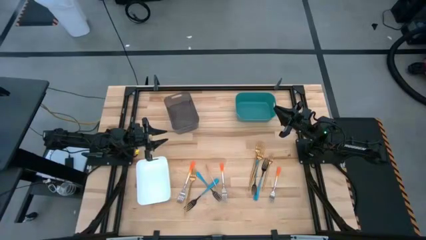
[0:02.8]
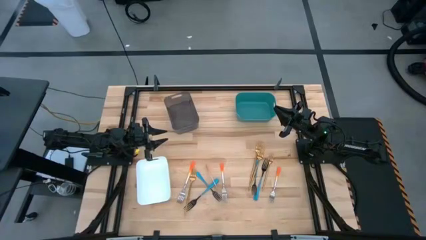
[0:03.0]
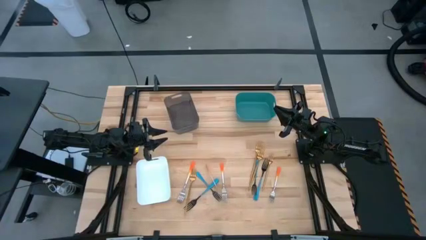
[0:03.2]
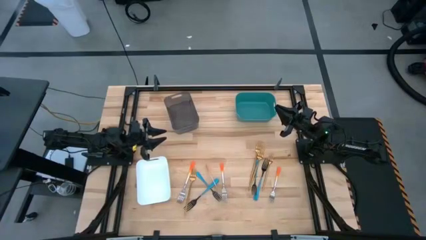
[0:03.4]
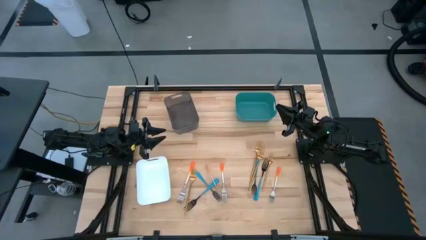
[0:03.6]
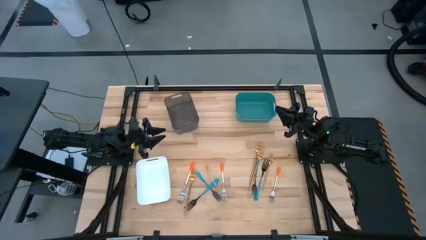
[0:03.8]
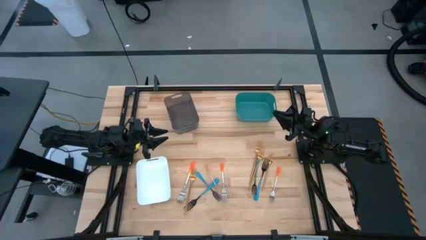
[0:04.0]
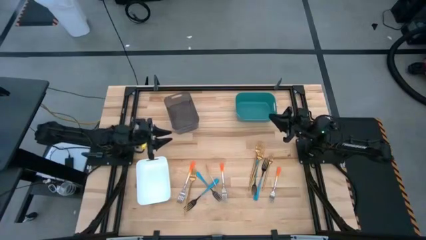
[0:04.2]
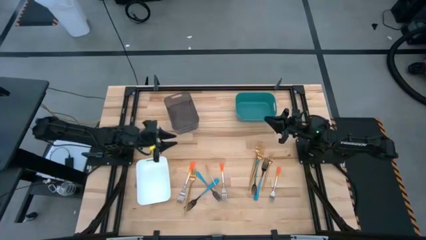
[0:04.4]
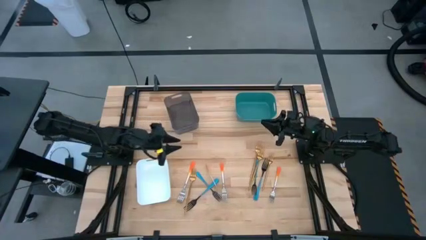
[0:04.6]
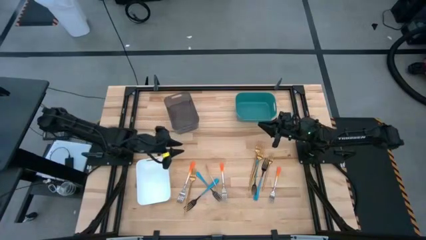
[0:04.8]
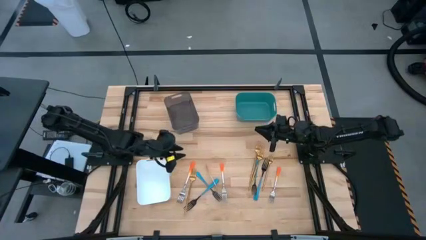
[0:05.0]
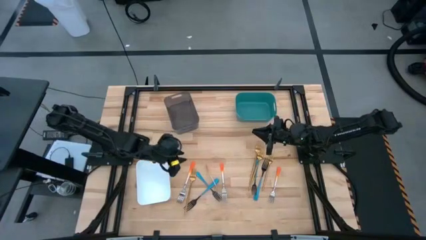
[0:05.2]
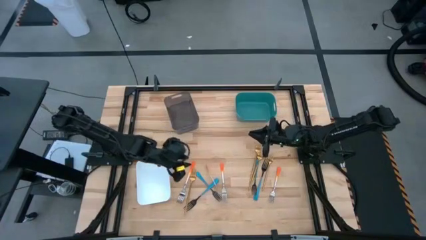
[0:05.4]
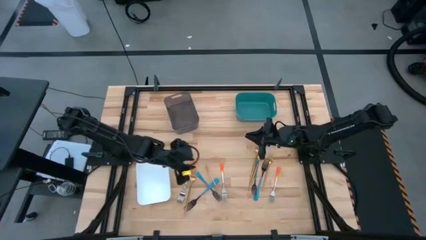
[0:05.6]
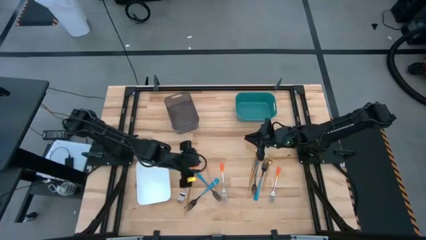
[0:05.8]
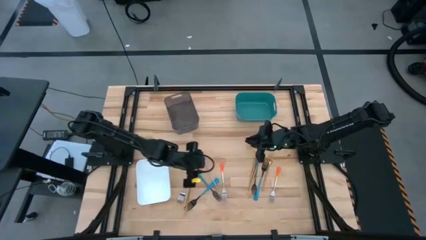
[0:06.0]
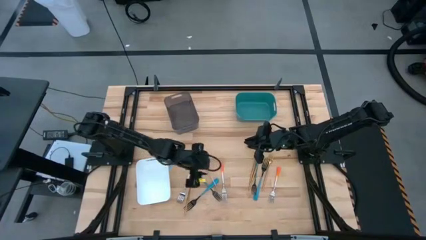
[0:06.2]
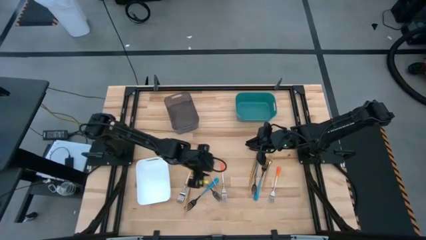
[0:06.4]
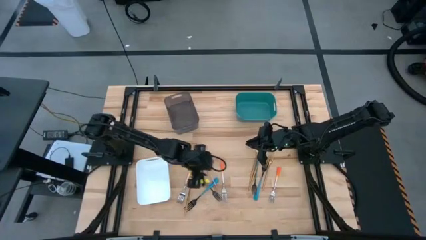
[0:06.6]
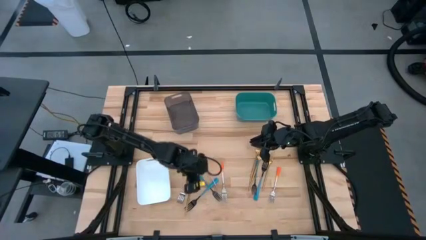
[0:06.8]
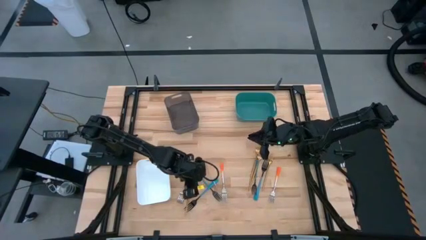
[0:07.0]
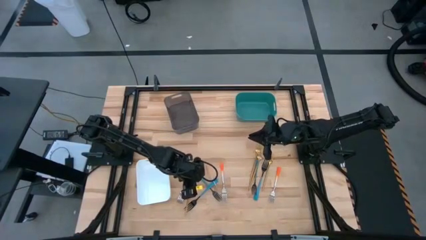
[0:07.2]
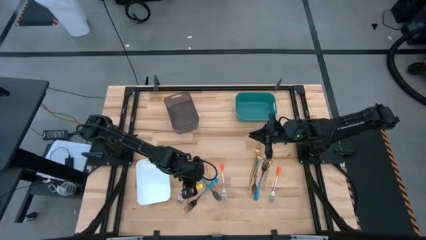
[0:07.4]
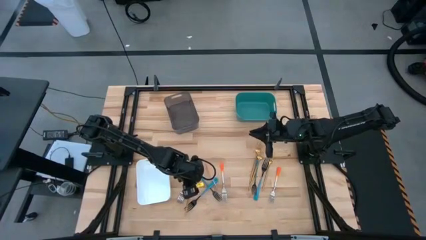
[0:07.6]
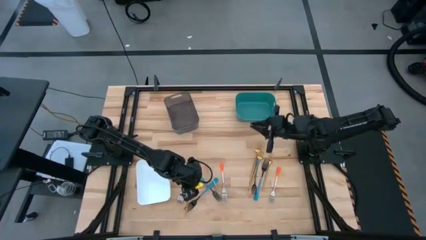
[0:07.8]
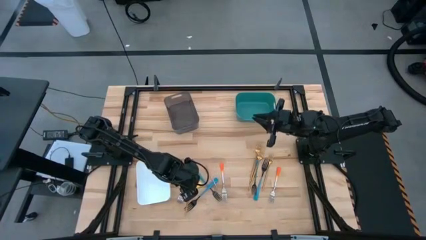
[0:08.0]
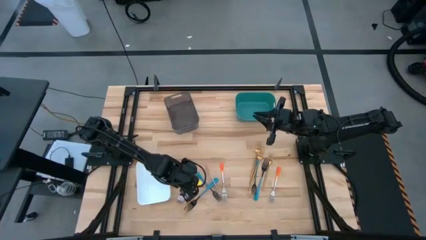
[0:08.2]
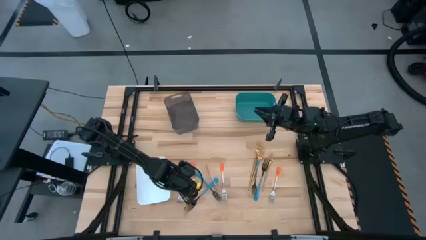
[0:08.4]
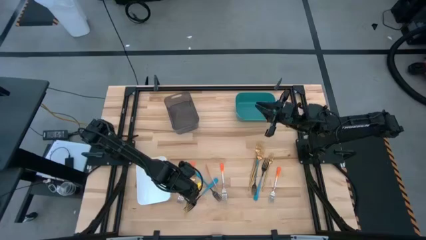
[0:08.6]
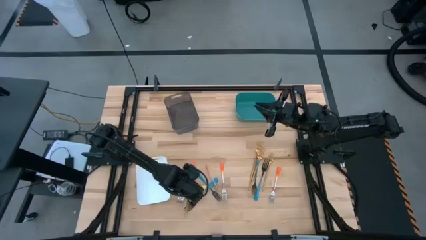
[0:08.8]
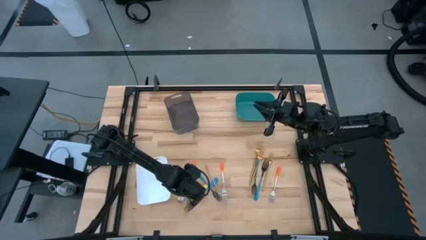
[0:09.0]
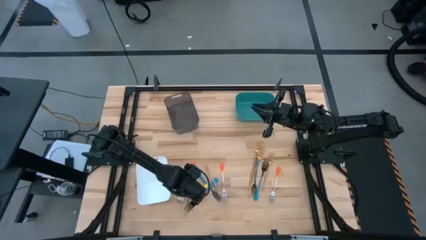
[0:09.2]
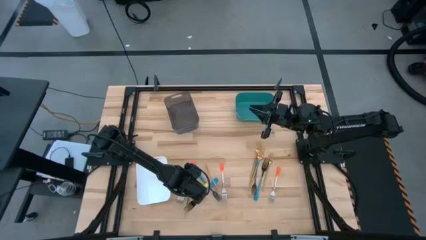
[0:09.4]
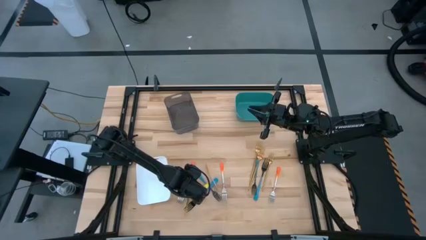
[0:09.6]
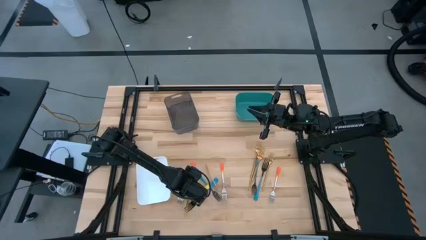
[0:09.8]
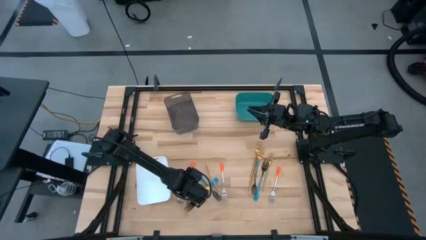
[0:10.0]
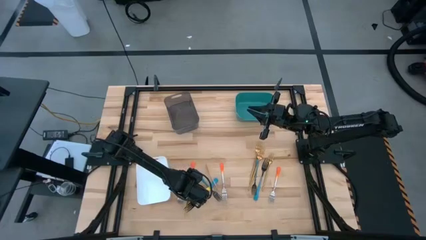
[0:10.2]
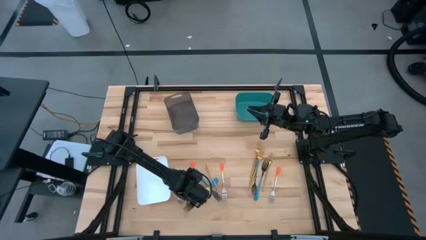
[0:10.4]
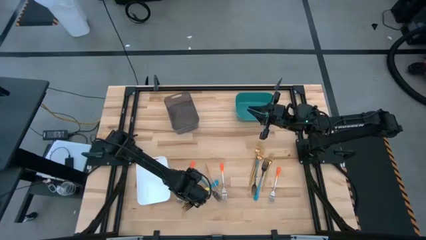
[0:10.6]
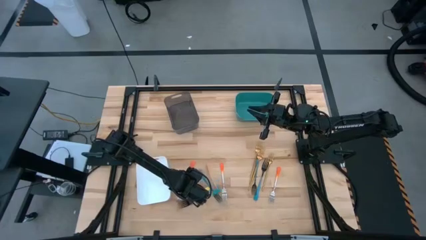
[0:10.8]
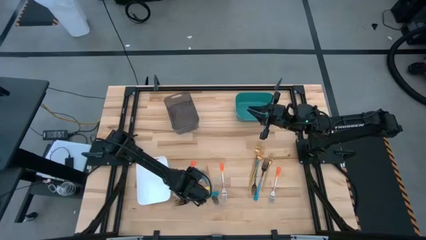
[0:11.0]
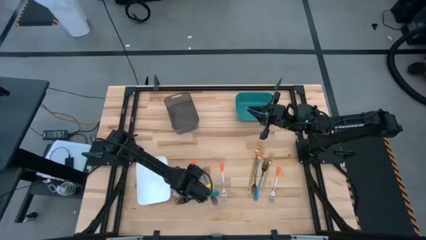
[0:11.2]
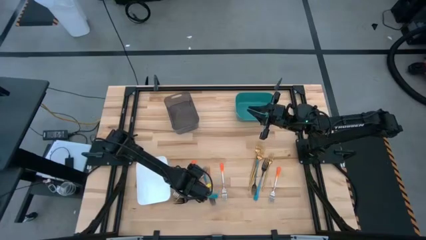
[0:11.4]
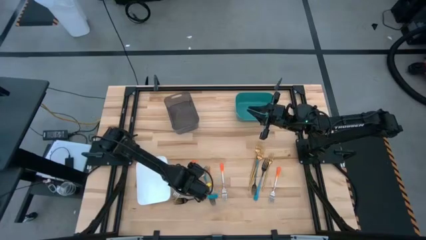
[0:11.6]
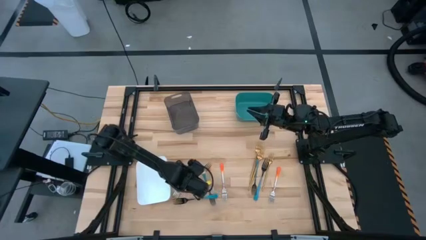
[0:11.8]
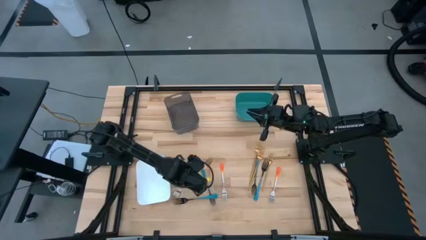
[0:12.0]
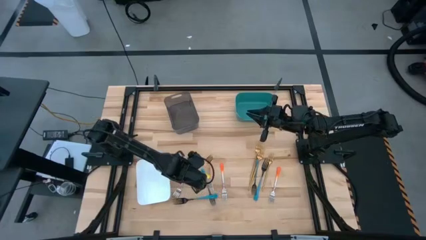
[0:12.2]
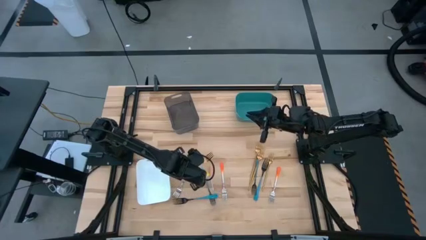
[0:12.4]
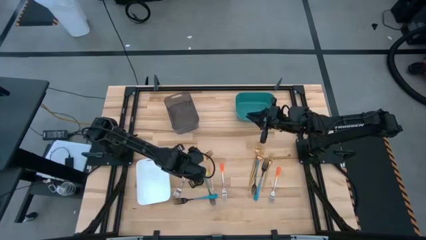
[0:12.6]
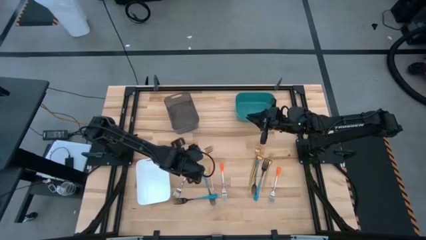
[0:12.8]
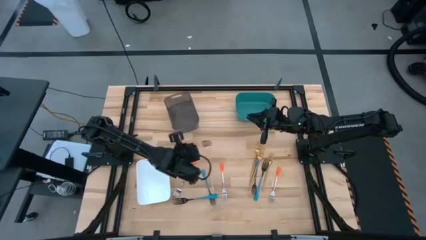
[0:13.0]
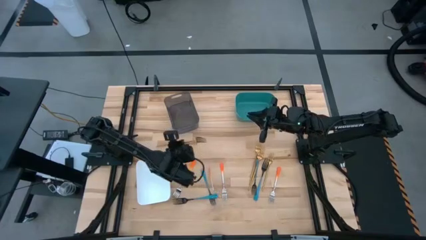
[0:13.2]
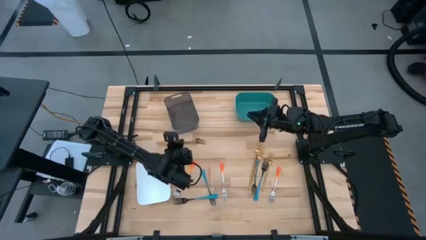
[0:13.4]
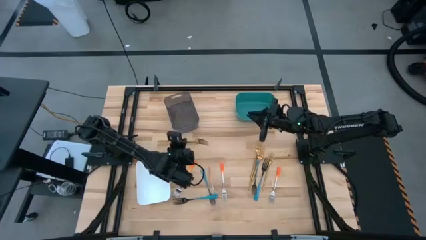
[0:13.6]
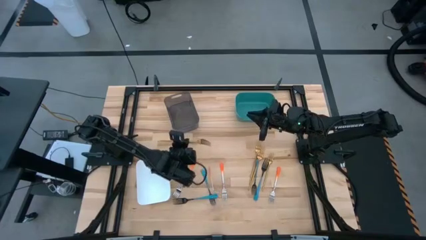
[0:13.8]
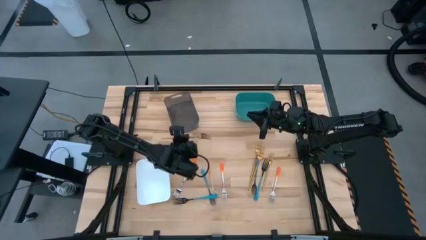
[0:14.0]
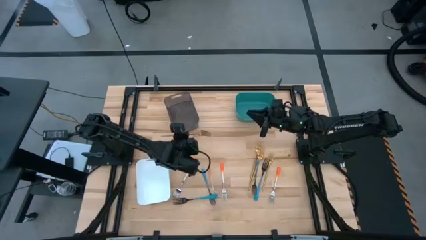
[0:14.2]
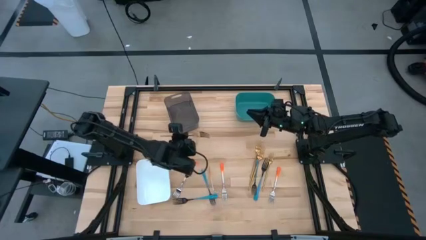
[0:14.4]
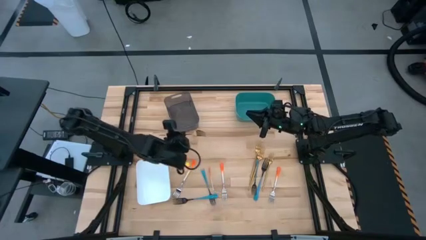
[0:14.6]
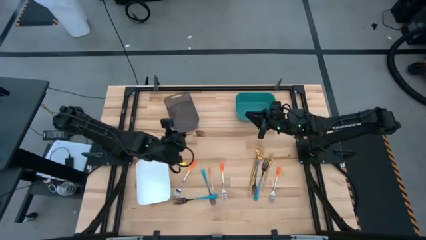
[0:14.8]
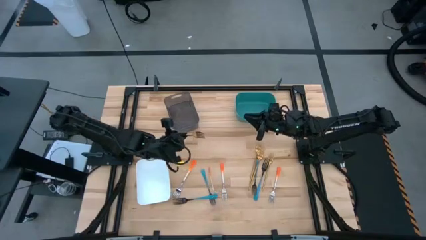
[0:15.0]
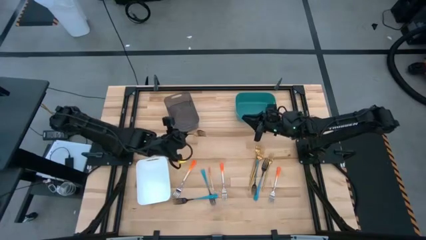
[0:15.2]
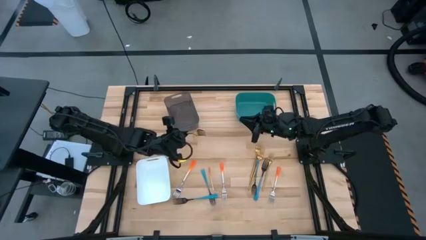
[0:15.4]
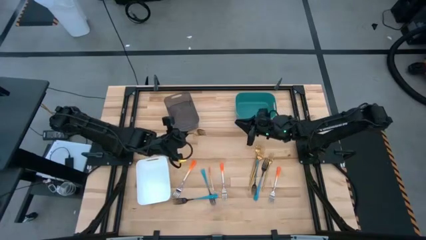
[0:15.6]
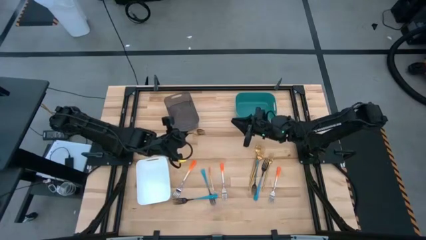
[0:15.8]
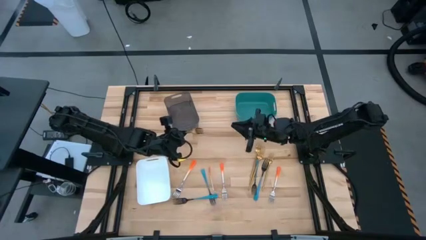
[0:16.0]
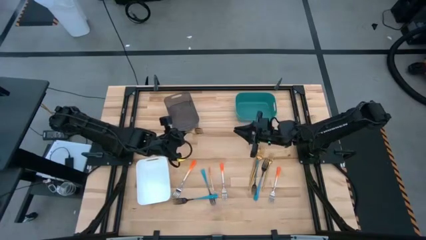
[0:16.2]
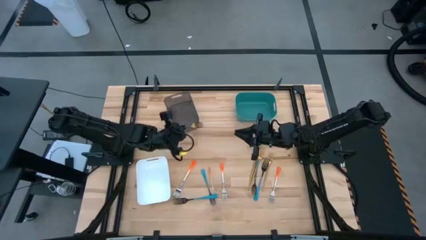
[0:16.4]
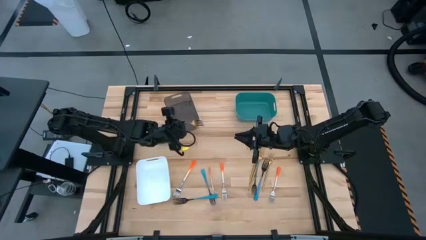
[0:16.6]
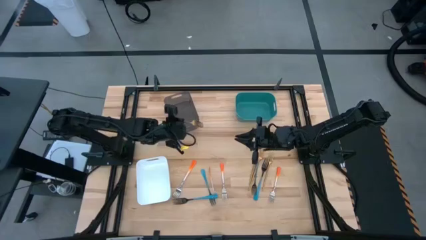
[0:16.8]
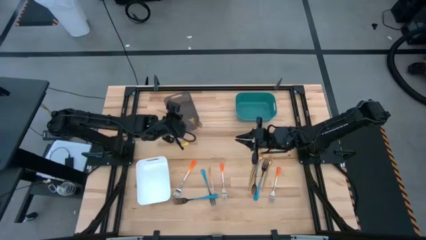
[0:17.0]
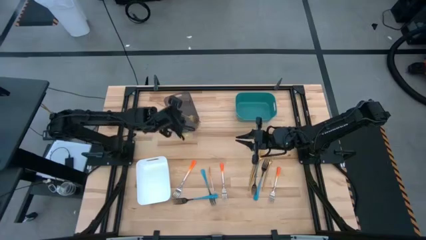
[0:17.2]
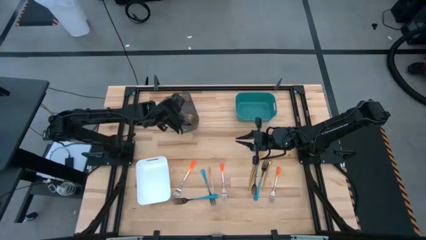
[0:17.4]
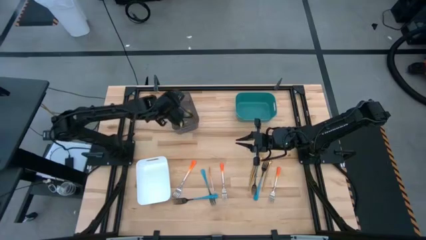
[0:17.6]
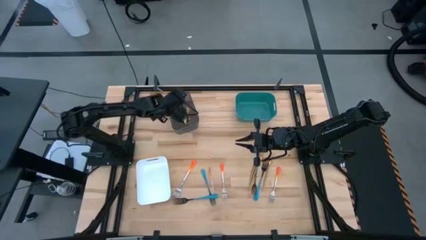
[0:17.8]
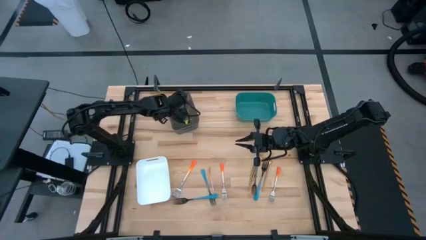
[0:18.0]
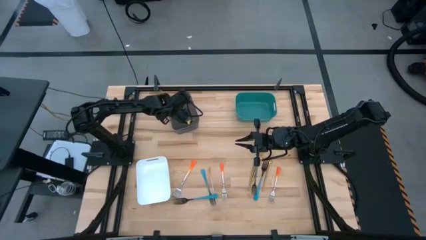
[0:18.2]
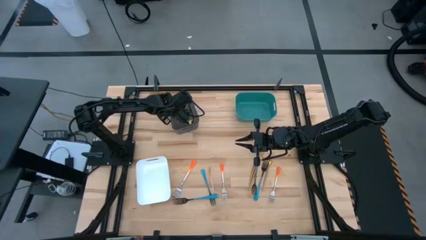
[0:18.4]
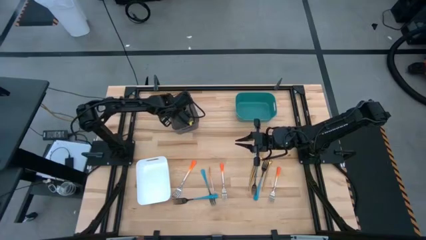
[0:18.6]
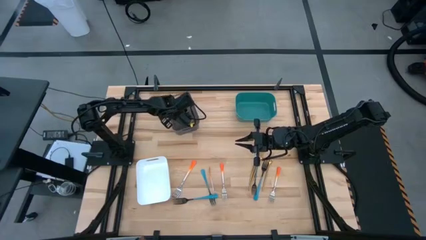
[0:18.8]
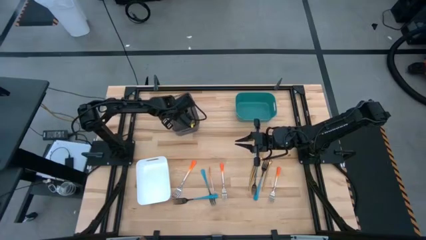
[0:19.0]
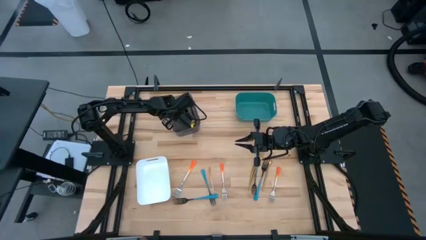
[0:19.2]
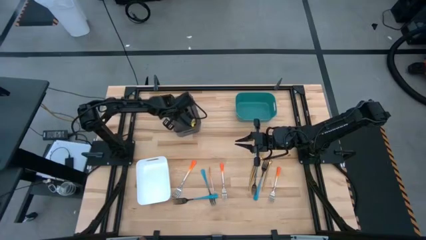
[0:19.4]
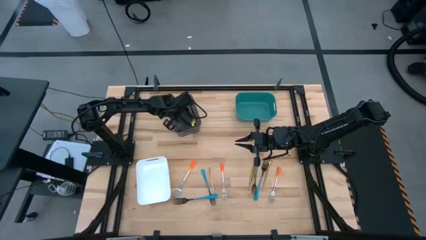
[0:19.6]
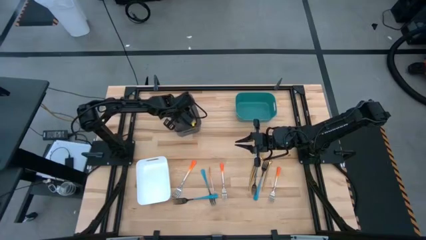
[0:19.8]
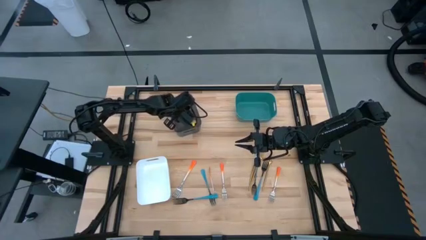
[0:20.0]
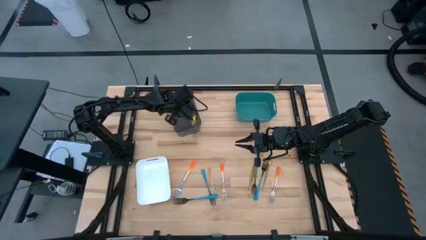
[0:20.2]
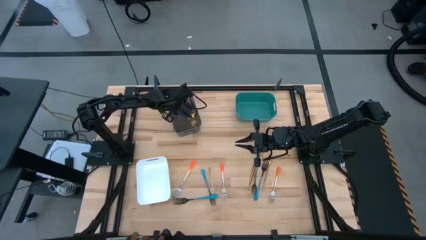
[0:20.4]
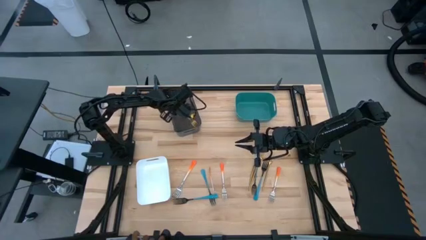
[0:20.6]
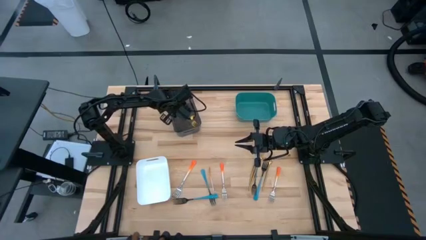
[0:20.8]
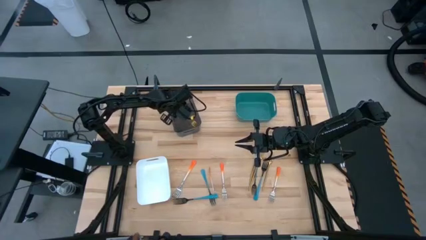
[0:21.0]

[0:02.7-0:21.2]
Task: Sort silverware by color (type)
Put the gold fork into the black bin
